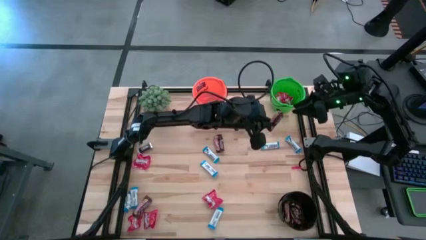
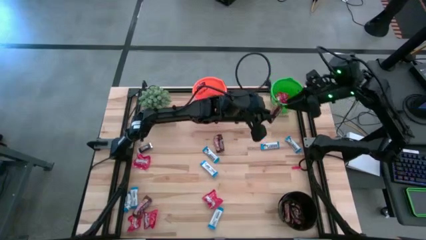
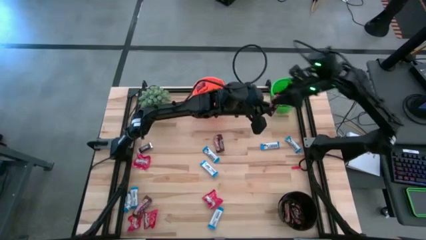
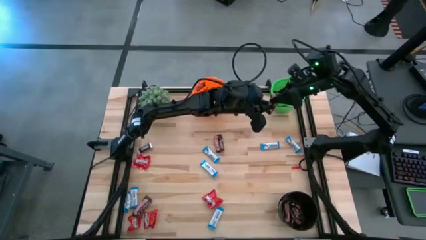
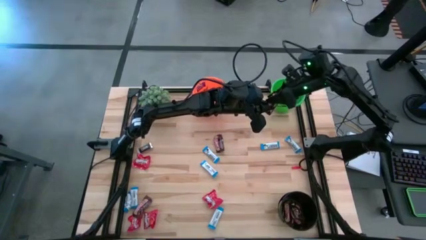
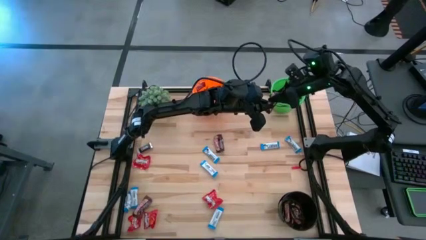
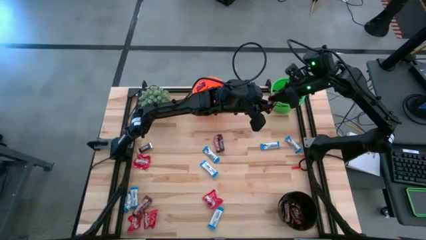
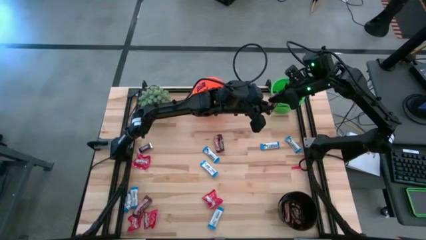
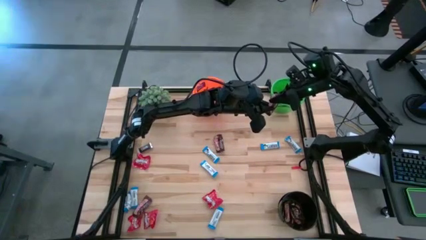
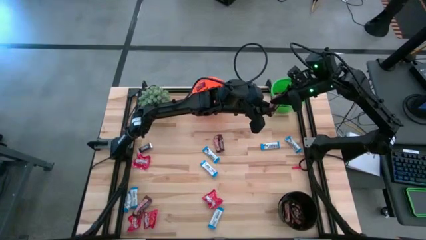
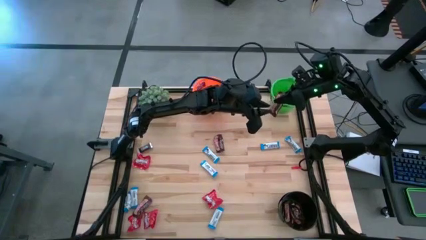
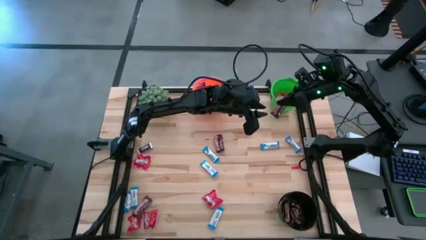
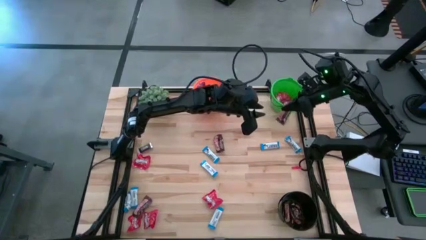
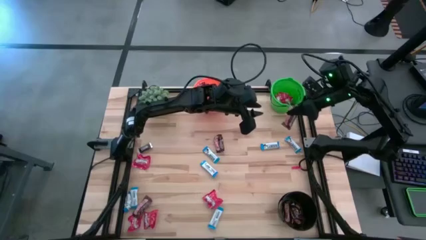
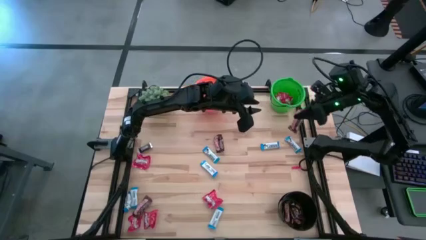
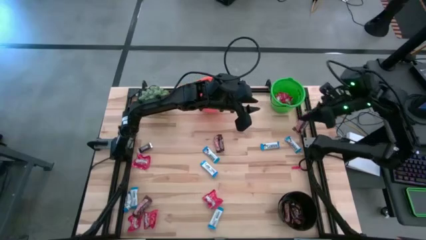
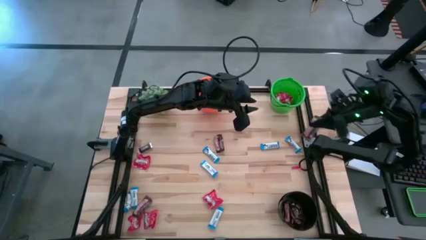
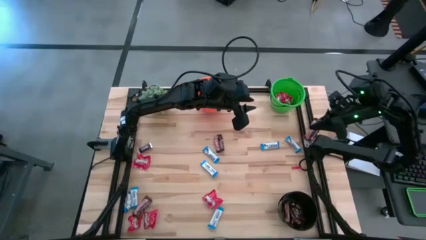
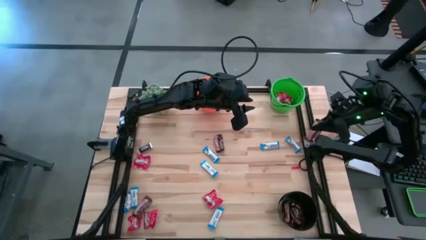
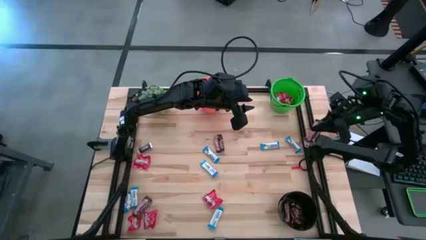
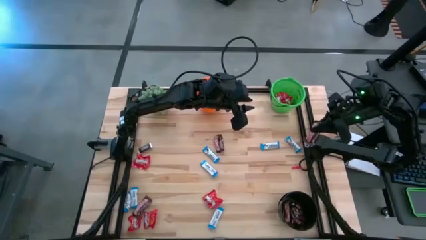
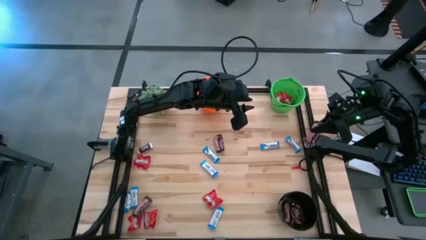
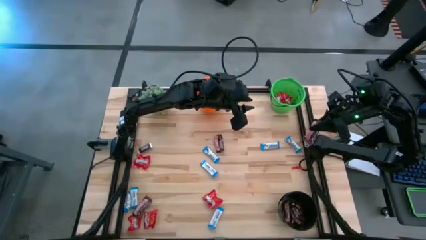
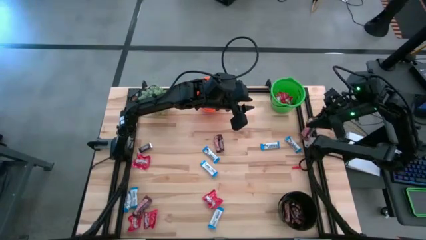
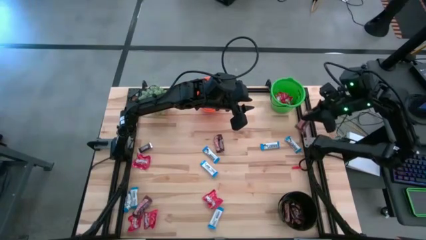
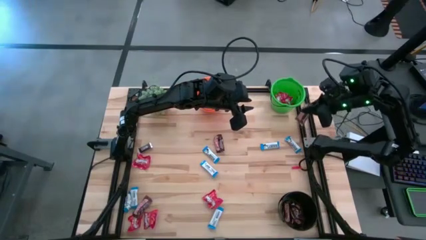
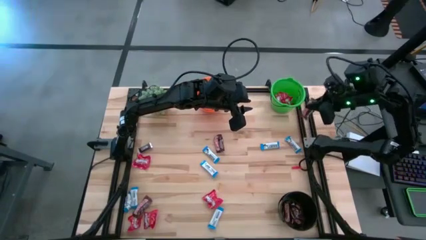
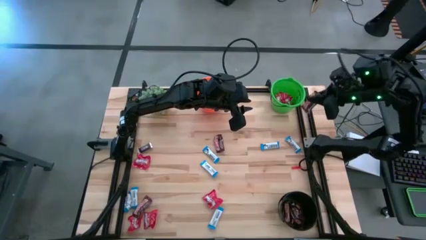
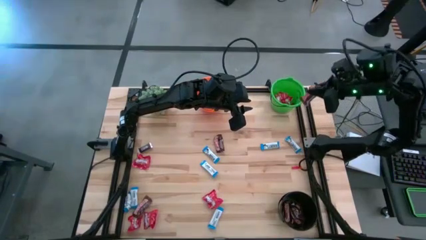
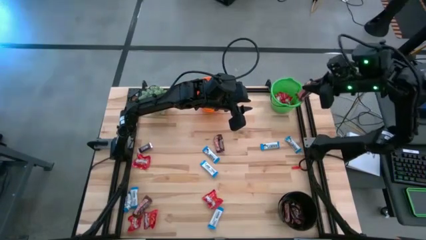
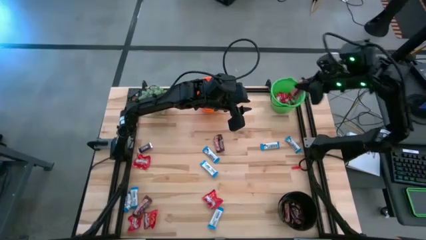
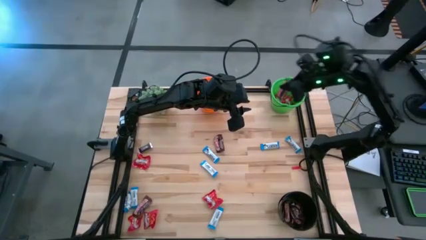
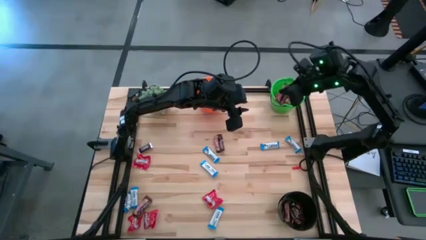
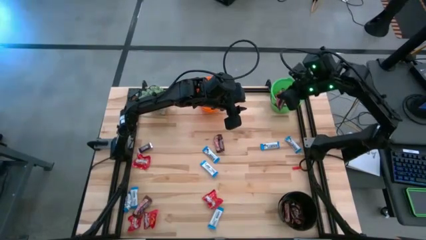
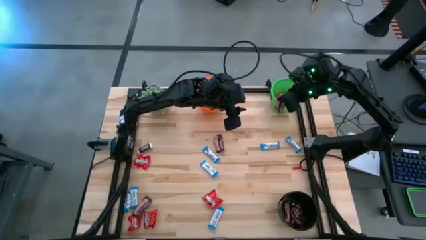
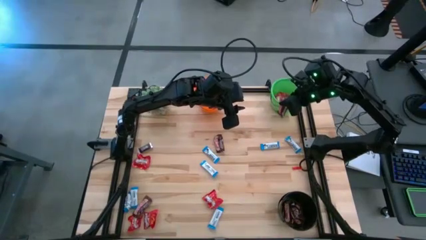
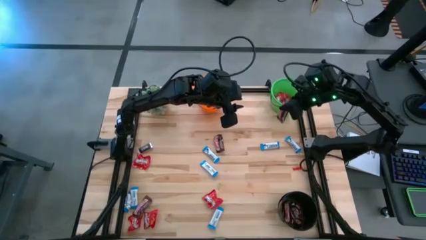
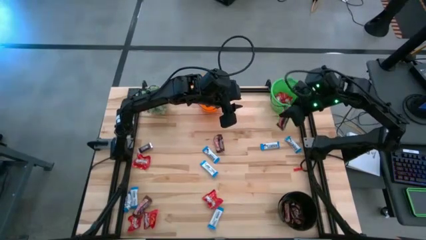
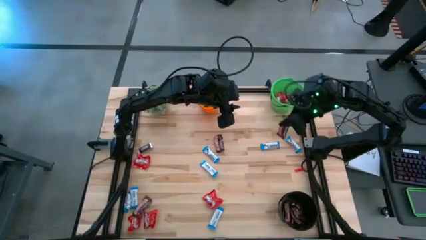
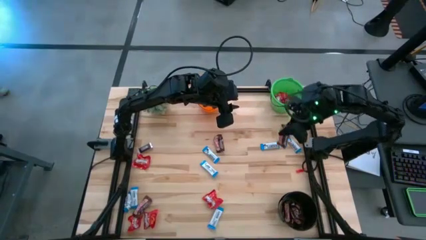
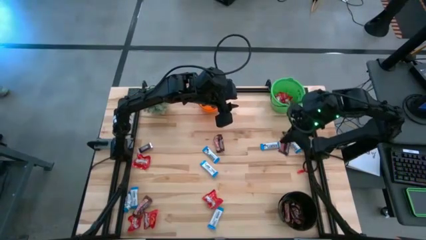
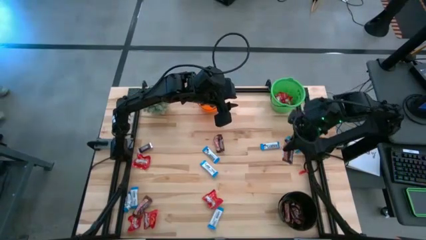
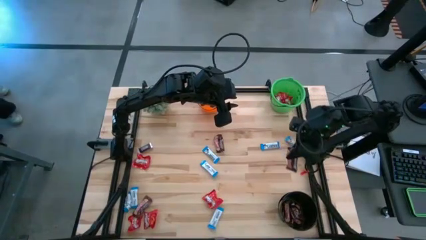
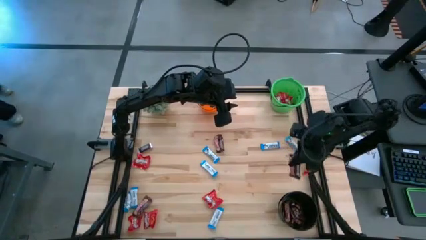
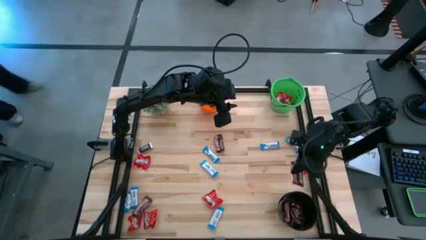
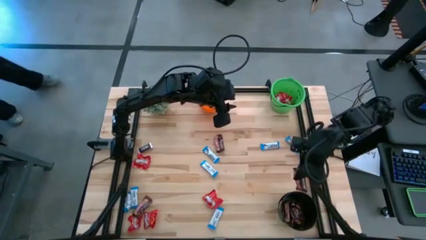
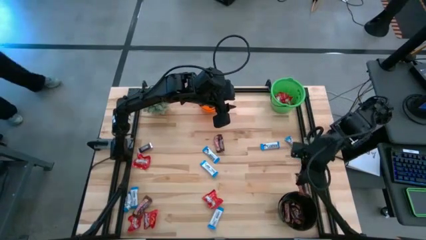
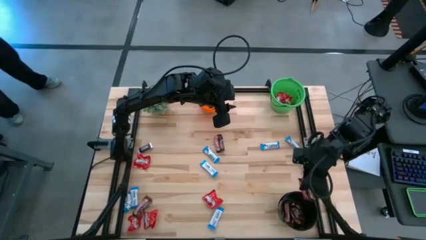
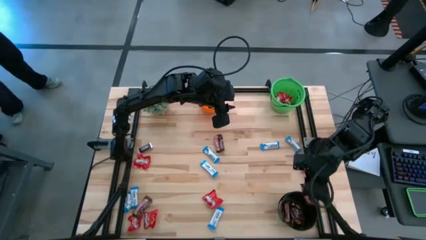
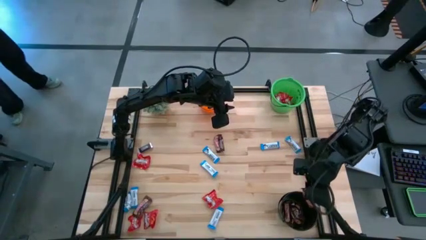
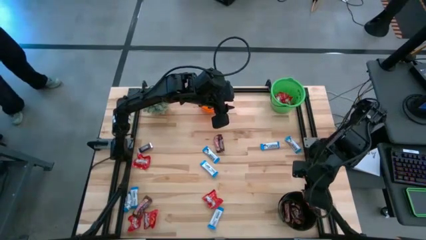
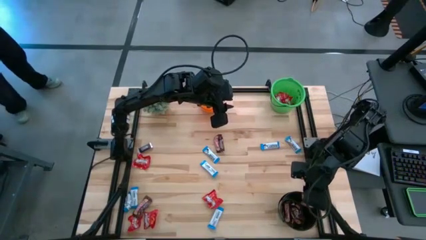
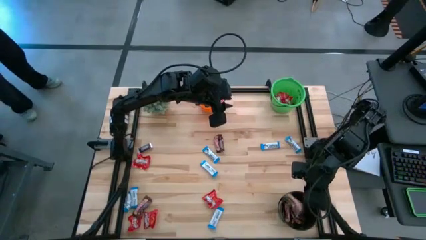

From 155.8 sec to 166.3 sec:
Task: Organize candy in baskets
Put the brown chocolate bar into the black bucket
